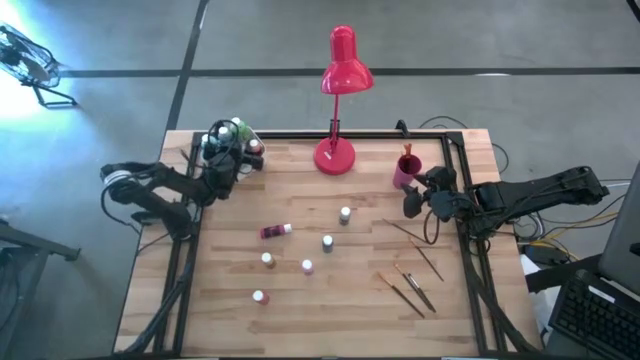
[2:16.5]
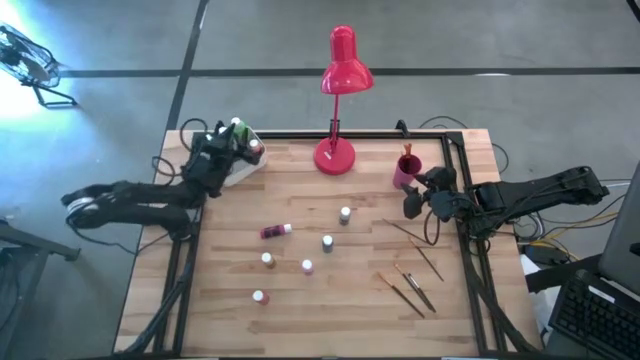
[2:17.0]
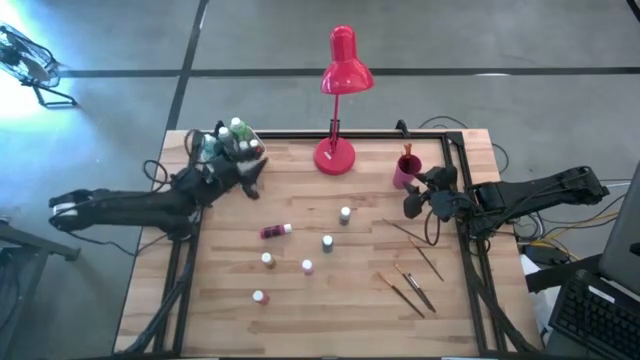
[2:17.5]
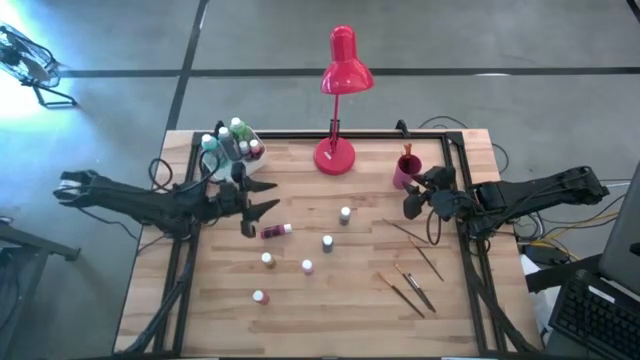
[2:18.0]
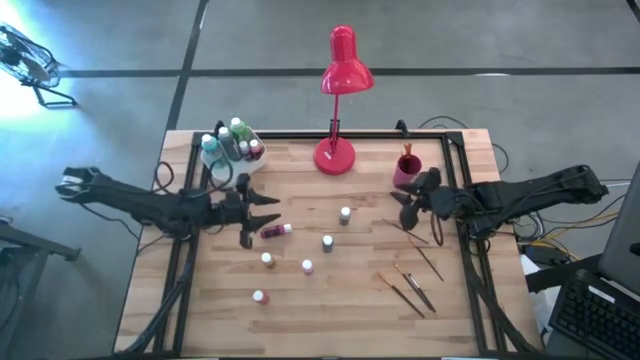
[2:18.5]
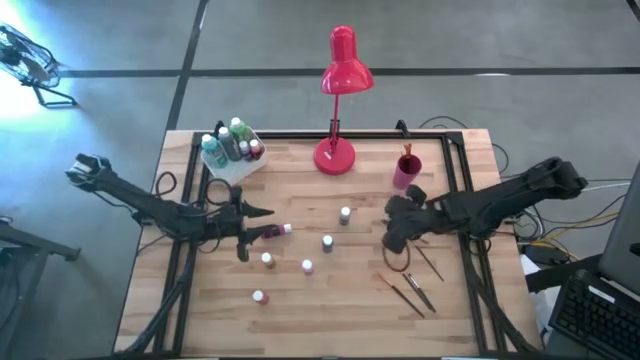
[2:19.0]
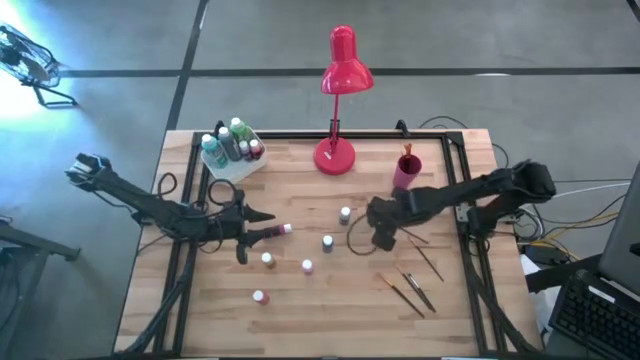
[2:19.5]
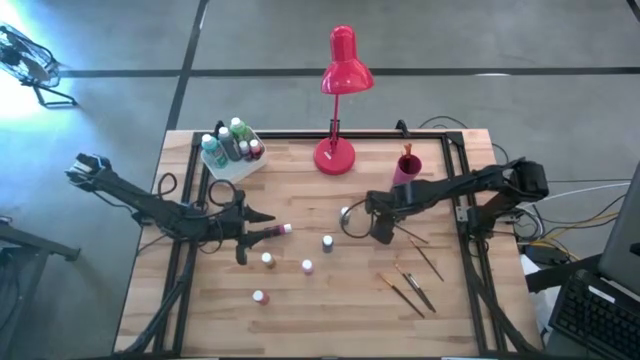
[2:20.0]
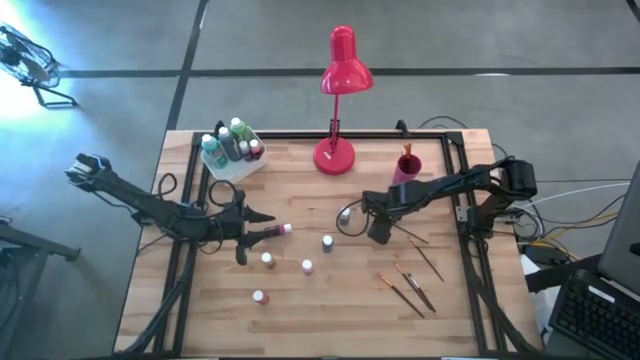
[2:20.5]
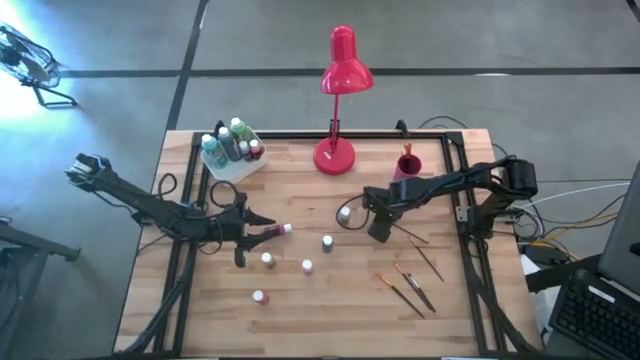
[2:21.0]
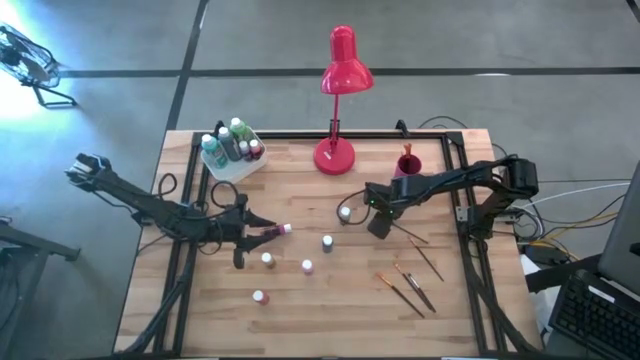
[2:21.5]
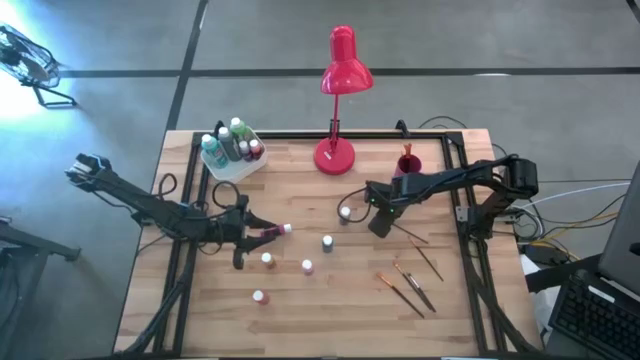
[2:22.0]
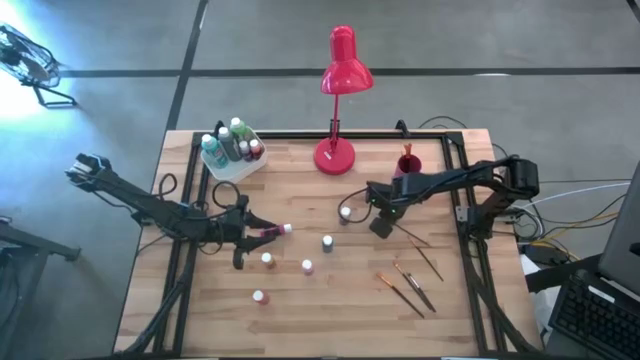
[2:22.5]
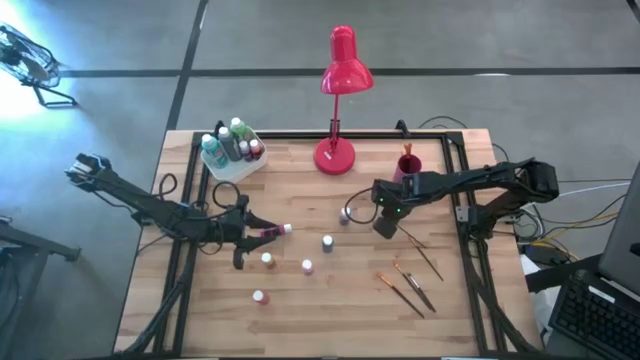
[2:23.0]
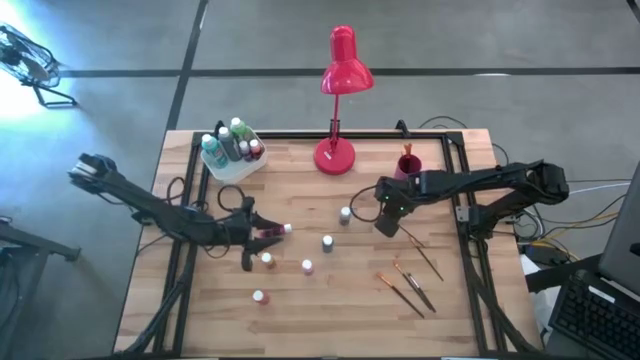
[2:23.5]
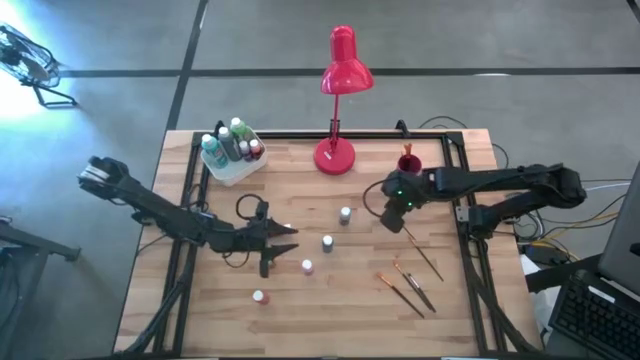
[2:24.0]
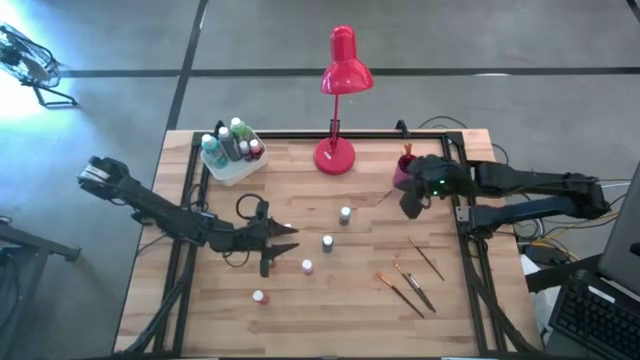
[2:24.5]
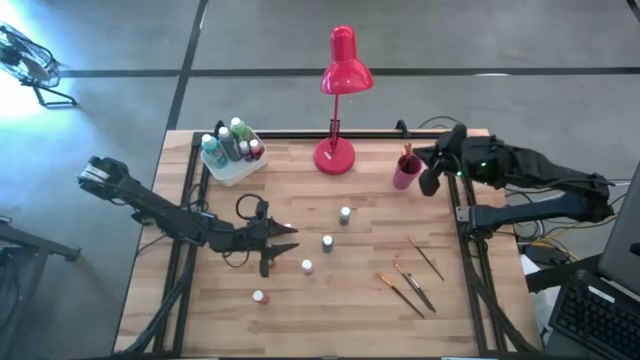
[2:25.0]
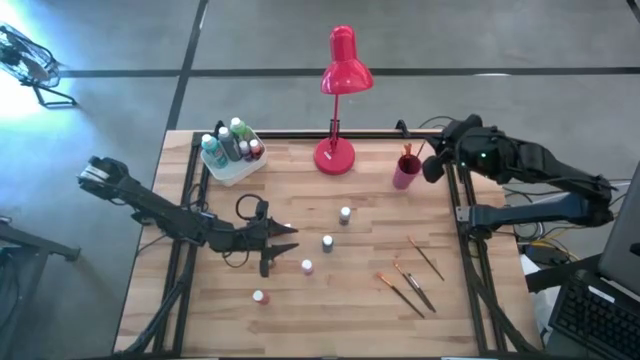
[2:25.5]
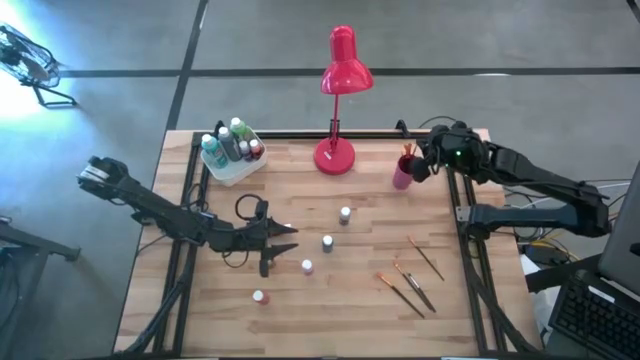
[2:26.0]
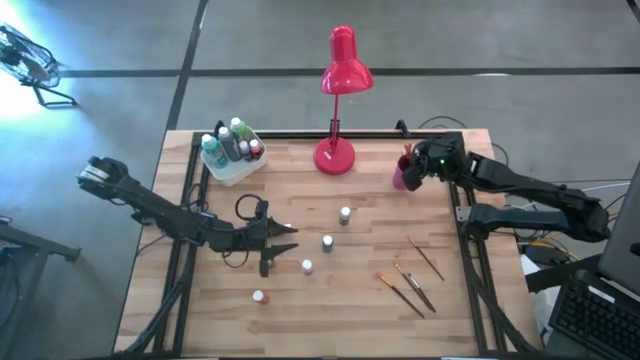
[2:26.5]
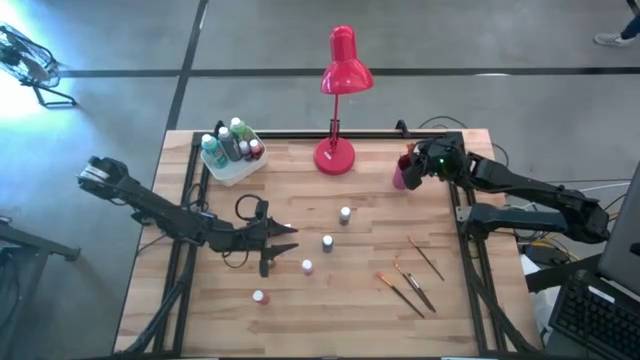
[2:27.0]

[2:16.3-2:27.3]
Task: Pick & Place Paint Supplies
Put the gold paintbrush into the pink cup
